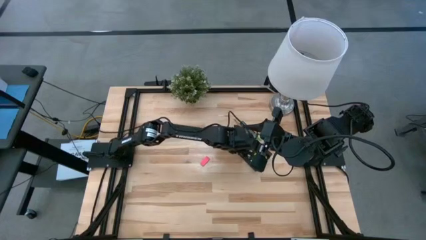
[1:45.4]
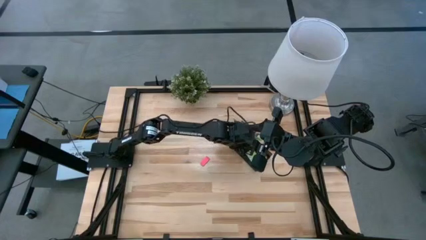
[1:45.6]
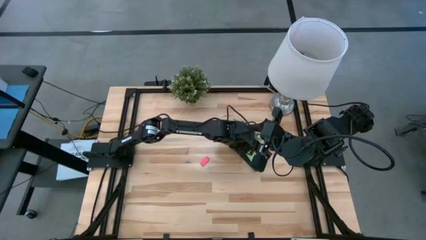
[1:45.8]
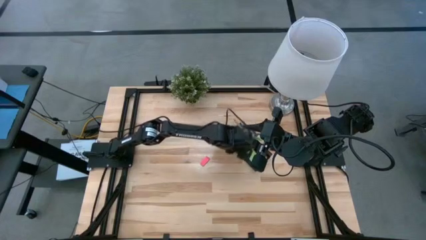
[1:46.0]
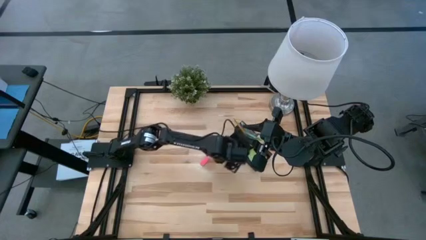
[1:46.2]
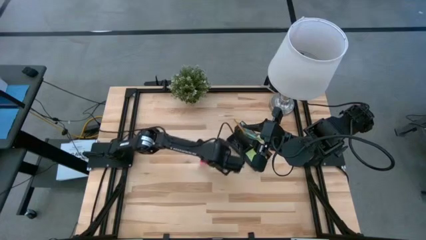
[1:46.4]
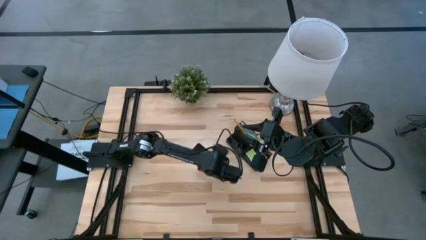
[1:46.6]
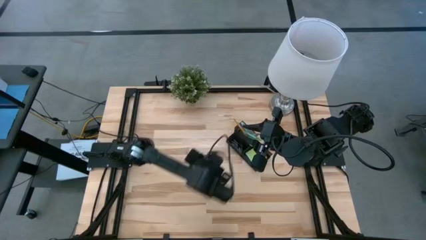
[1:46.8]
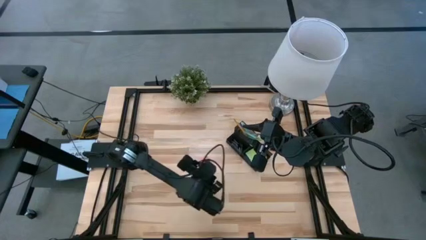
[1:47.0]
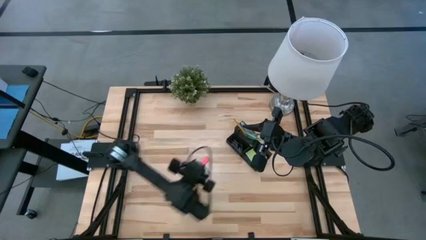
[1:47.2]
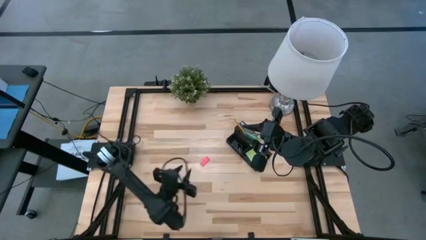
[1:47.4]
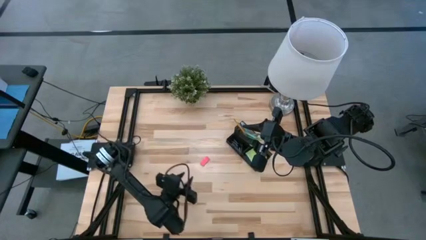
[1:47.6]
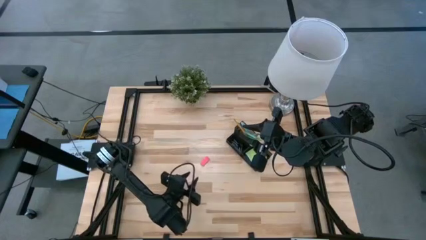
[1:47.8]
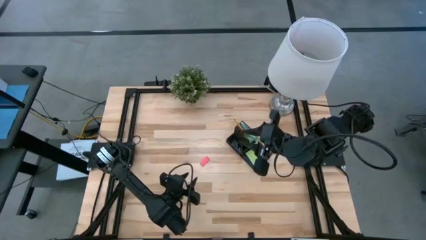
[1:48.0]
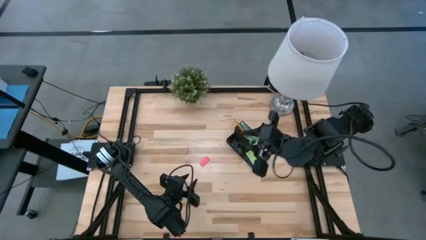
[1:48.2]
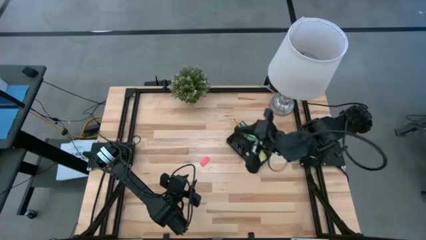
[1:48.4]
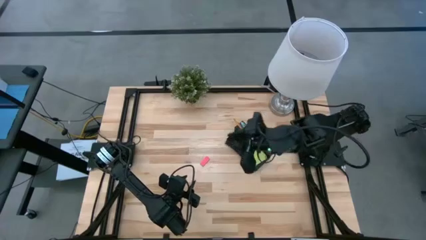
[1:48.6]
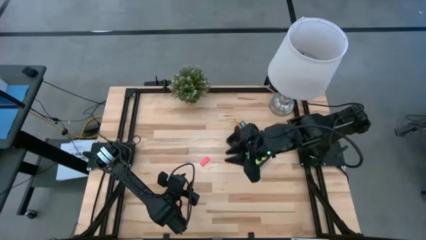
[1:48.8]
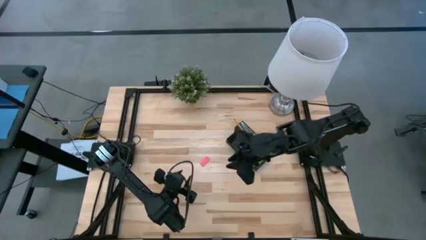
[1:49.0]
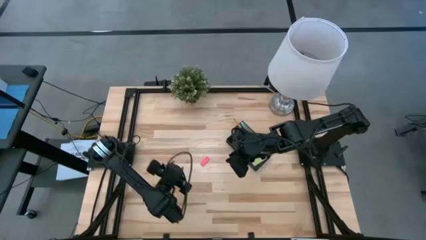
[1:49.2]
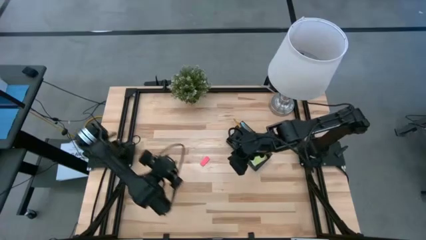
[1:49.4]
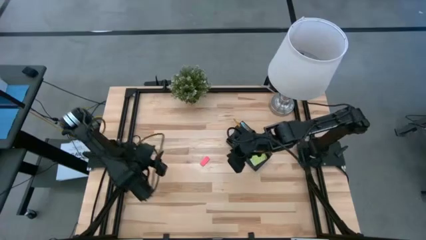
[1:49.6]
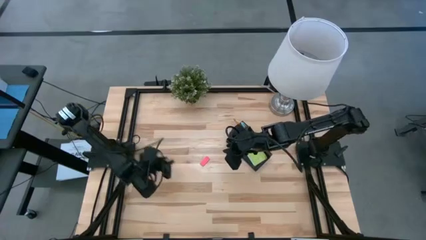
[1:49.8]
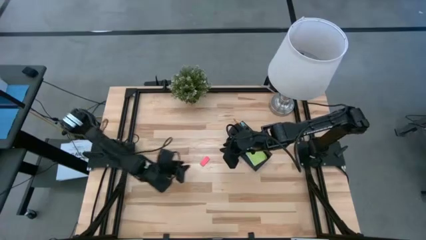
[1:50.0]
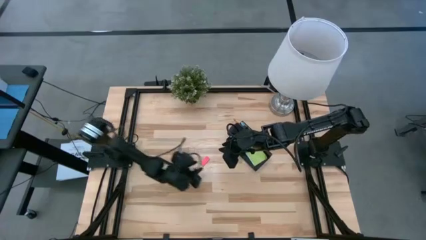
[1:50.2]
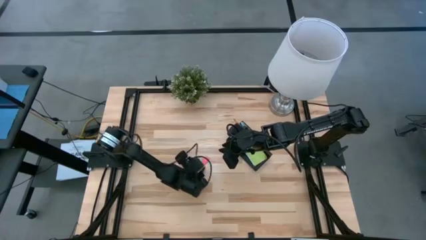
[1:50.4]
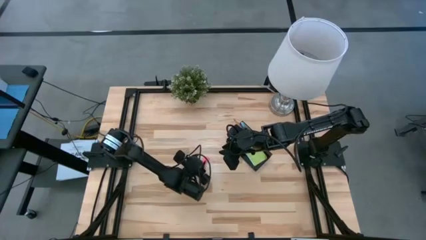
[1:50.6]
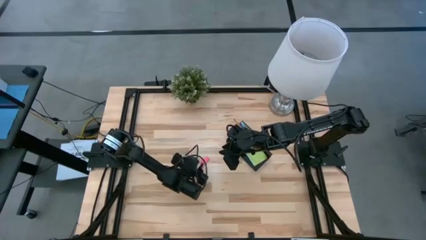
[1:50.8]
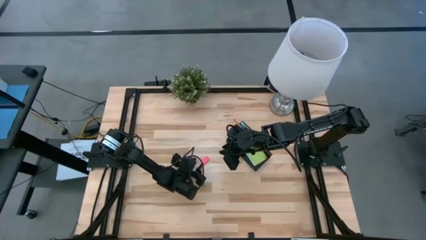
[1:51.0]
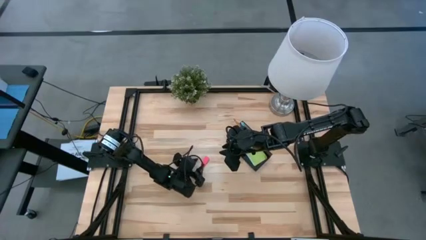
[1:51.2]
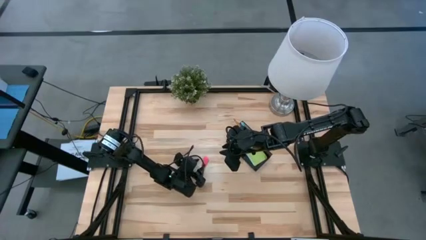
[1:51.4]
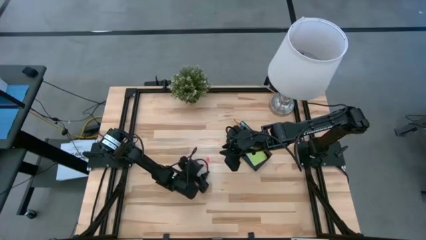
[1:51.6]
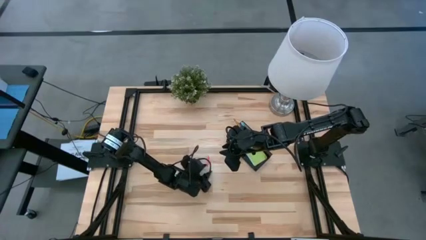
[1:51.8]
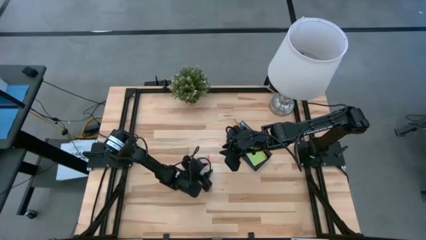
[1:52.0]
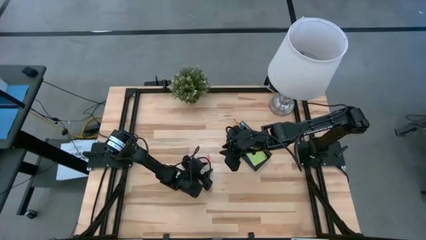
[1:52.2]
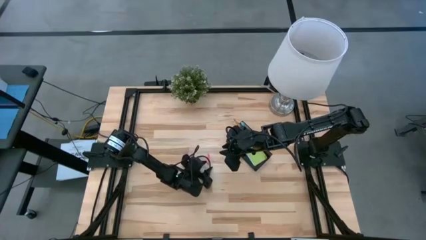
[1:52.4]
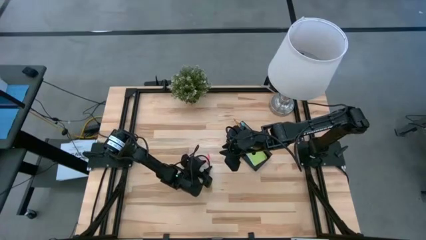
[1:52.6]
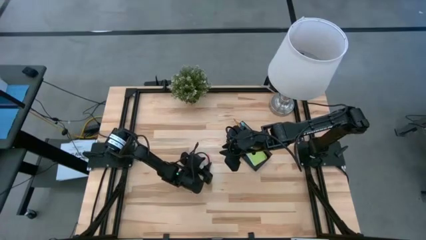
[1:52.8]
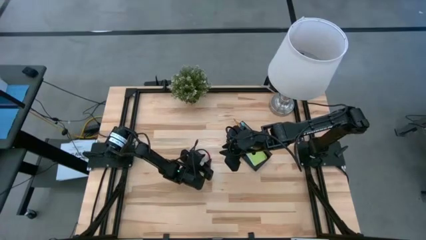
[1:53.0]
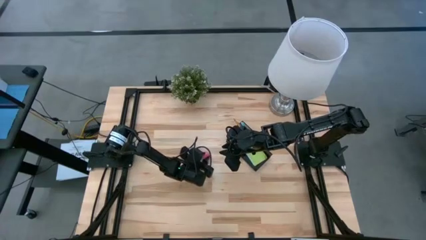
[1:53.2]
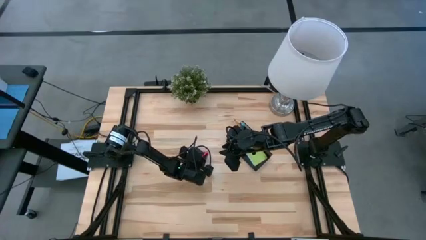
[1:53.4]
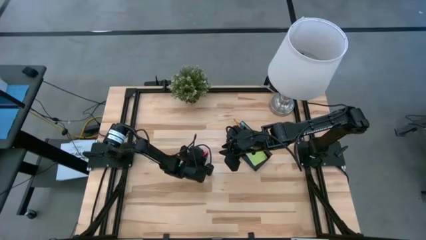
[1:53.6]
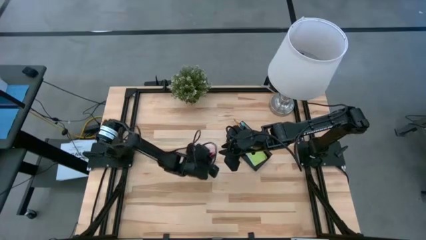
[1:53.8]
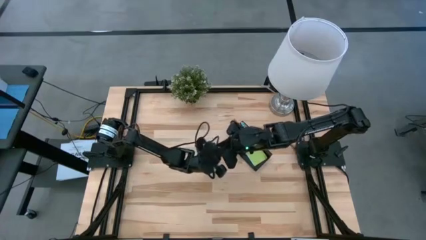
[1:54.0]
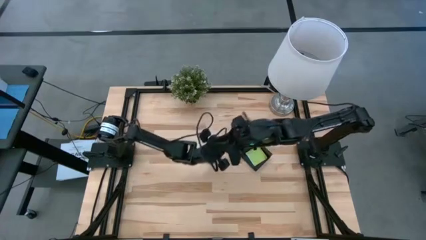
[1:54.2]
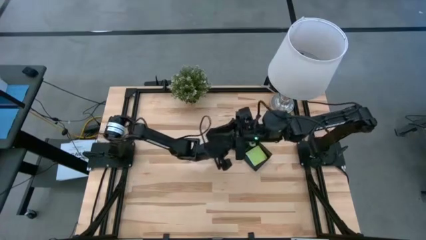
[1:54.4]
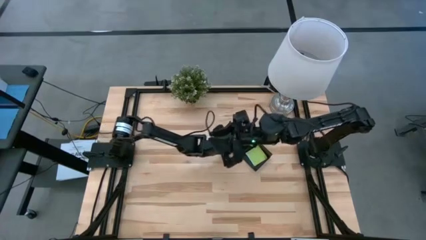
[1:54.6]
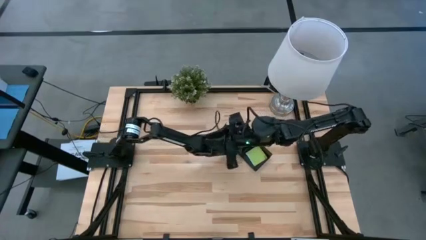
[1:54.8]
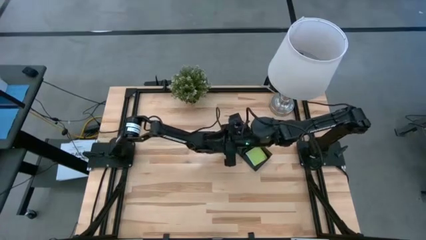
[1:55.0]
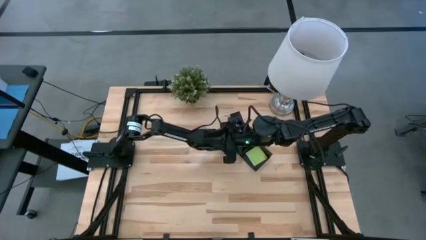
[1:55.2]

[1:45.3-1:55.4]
Task: Pick and place office supplies into organizer
Put the pink eraser on the black desk organizer

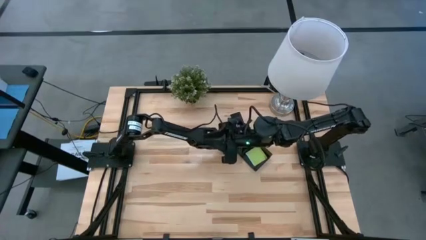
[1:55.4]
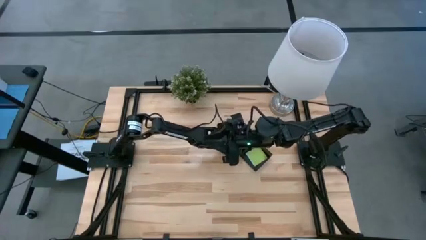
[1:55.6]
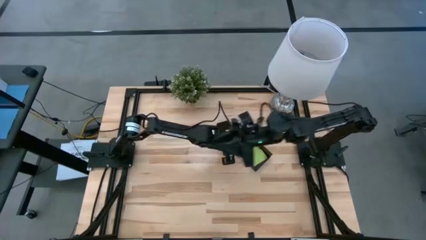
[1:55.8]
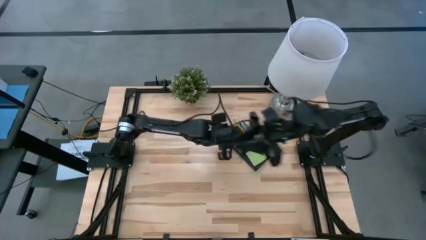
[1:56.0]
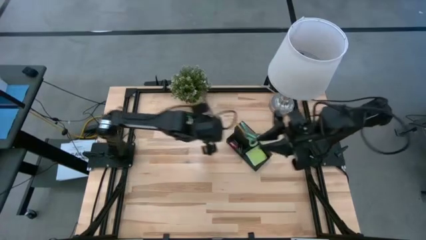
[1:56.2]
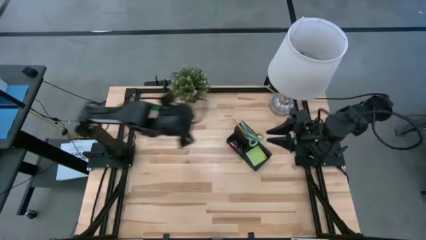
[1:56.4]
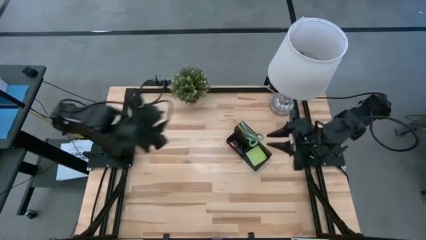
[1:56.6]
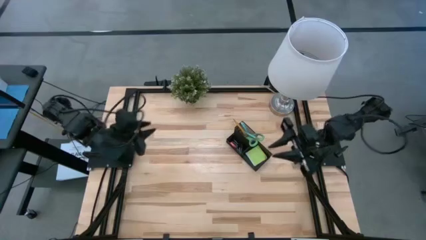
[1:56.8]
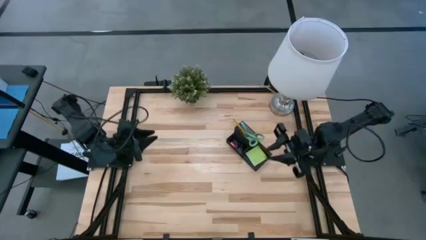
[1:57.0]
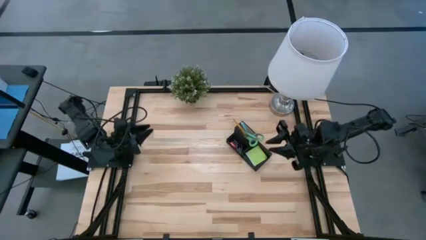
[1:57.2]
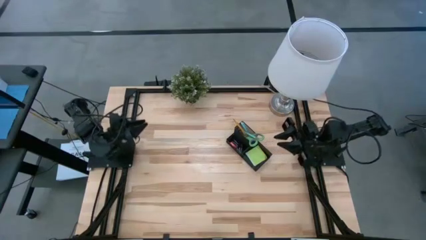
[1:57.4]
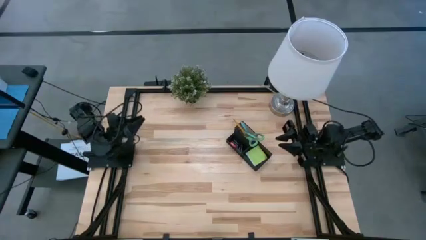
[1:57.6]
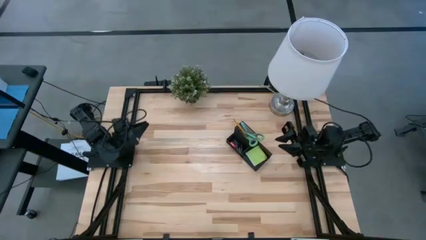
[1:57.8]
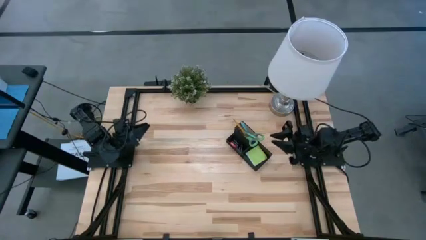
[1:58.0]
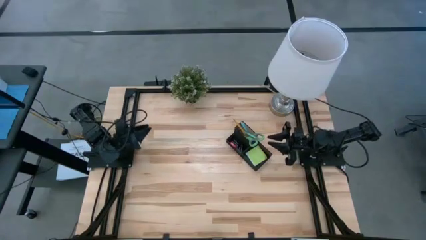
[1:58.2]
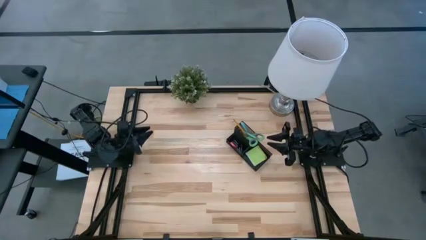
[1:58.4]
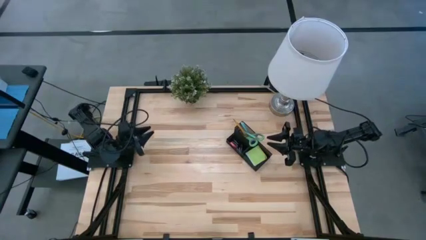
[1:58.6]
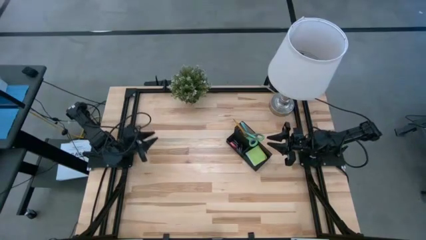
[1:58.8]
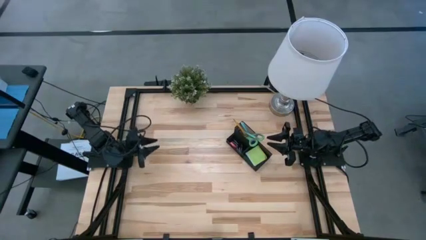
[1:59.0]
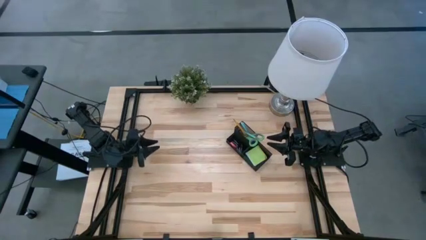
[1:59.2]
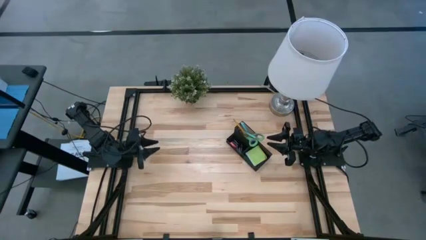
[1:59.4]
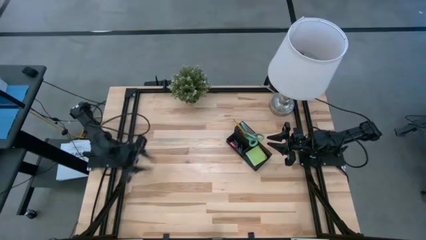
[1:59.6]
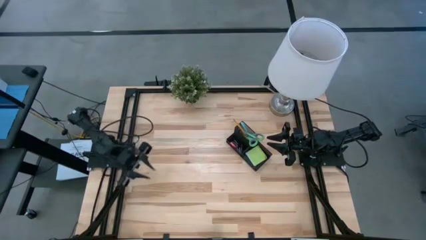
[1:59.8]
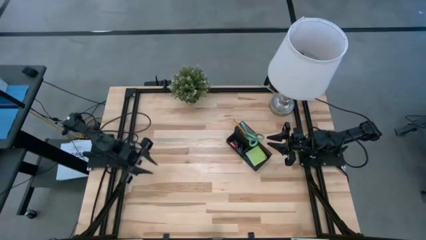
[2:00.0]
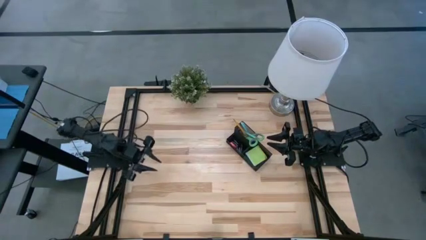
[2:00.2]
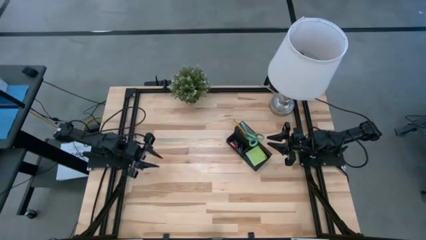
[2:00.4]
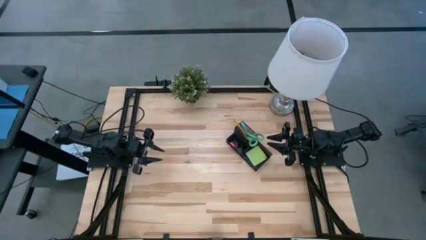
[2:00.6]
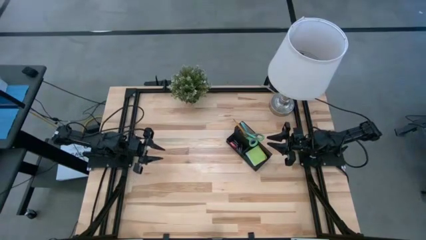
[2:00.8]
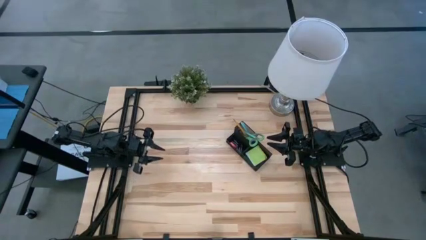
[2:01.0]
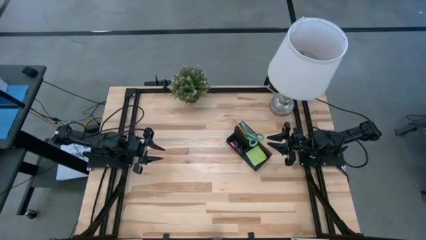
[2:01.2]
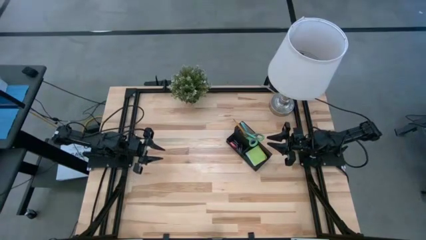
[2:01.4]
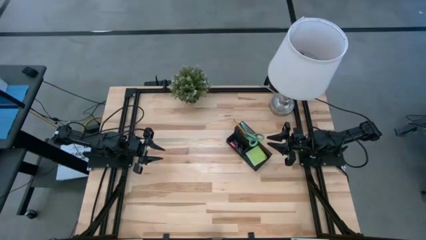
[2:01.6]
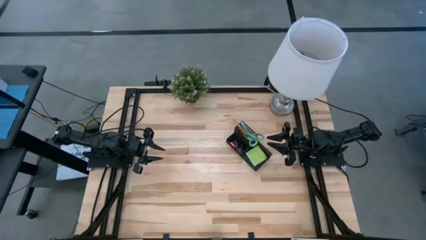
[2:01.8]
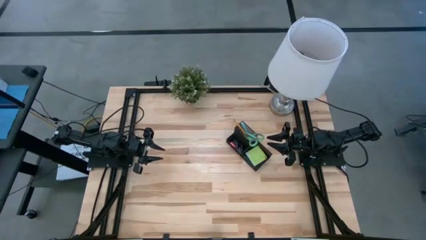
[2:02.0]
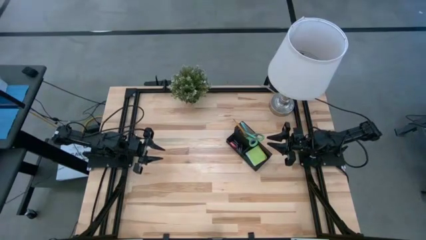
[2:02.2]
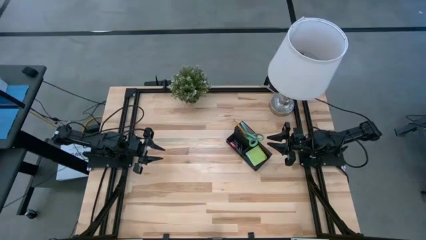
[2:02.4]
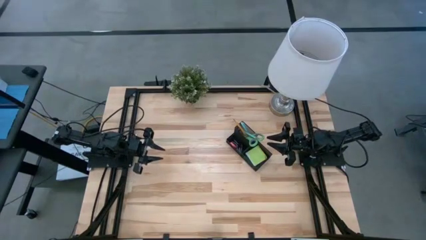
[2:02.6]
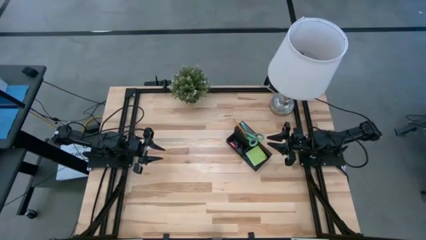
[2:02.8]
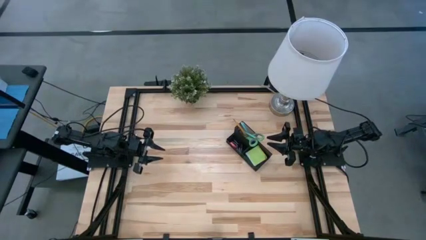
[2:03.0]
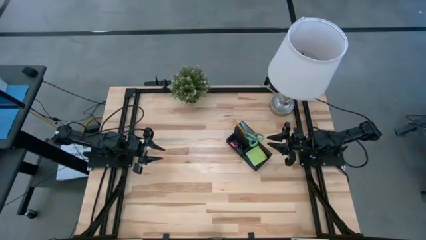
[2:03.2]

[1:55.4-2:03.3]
Return to Home Position
